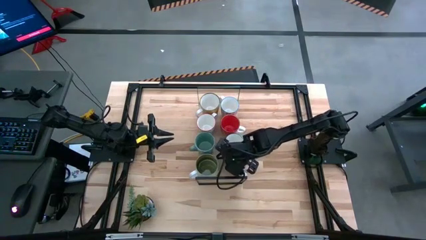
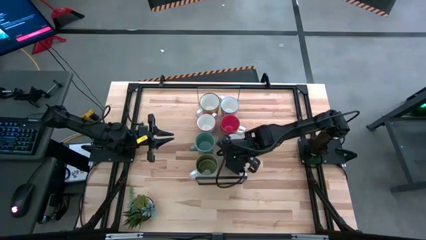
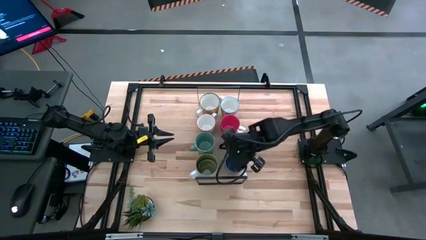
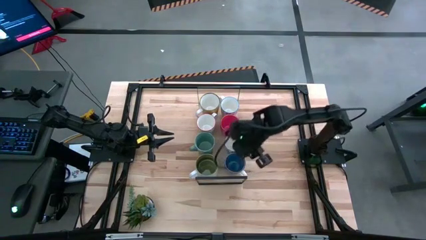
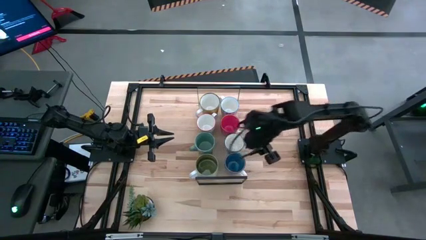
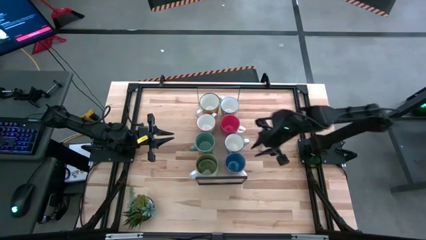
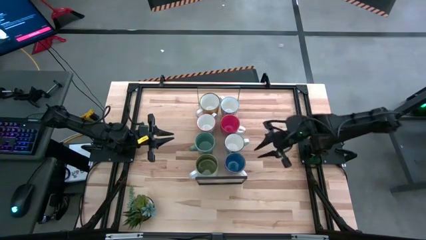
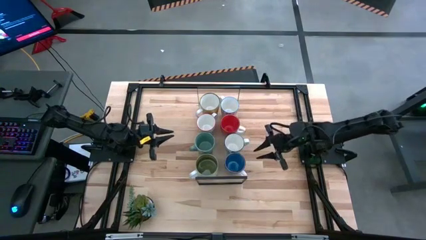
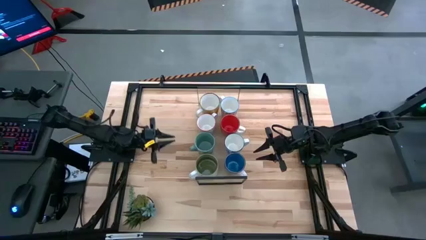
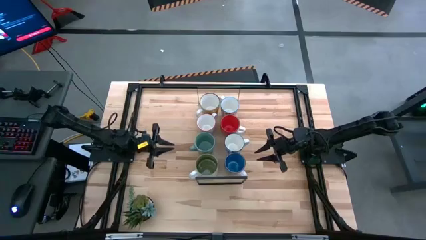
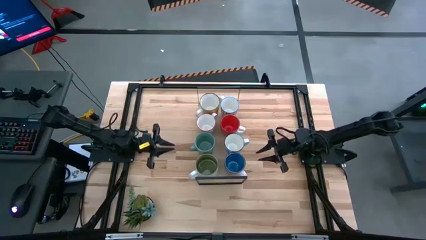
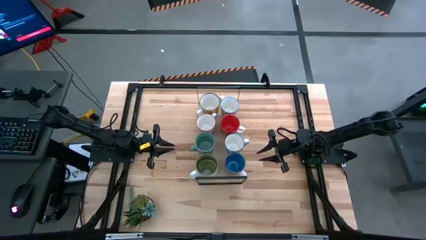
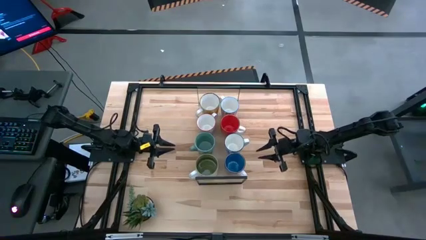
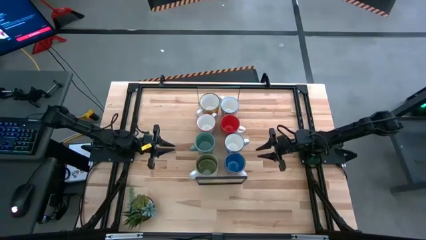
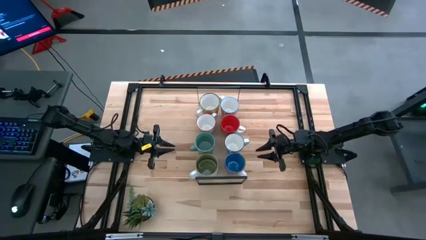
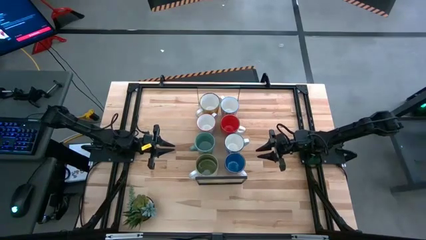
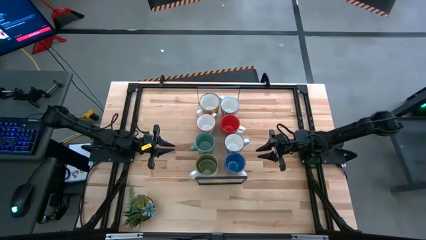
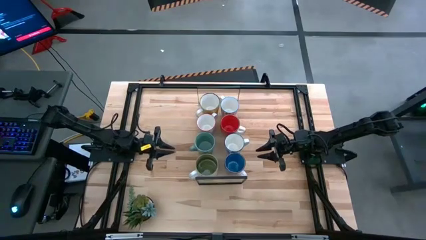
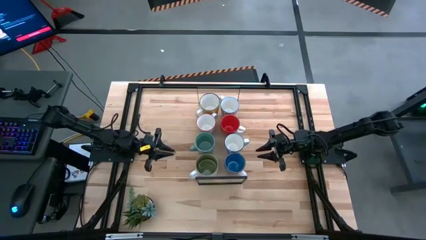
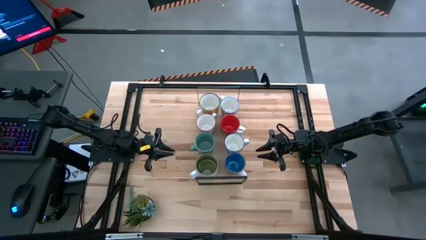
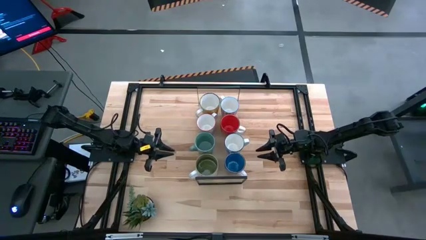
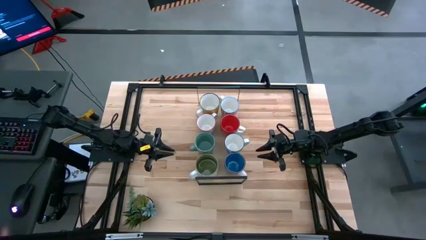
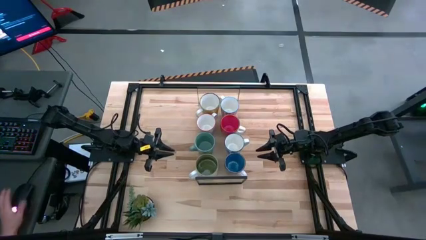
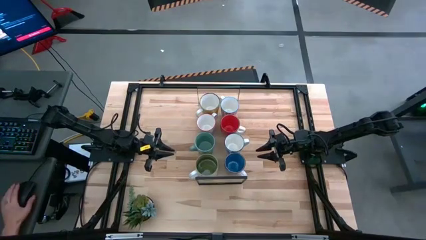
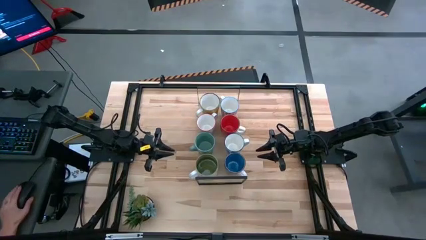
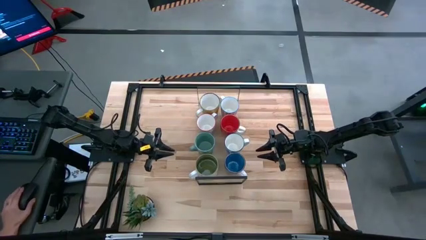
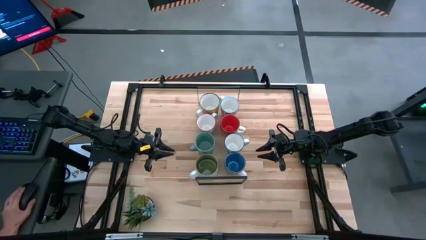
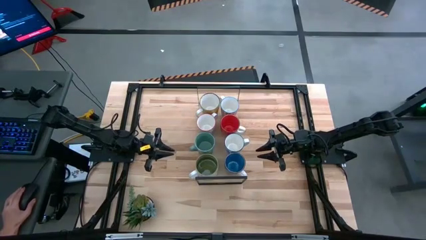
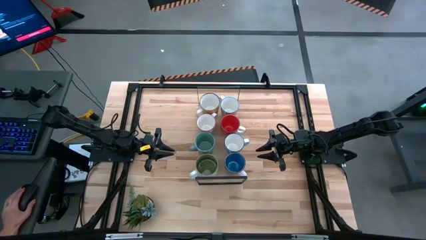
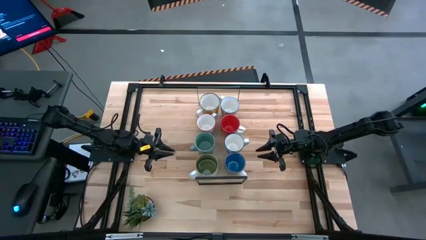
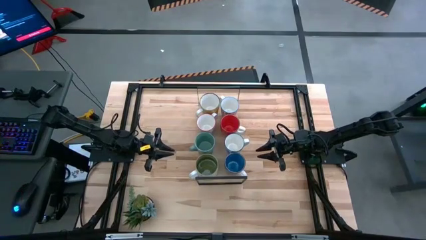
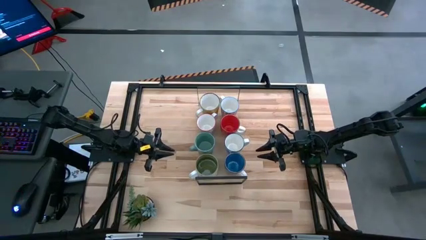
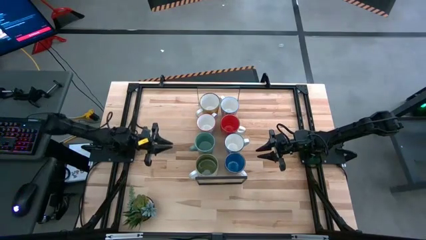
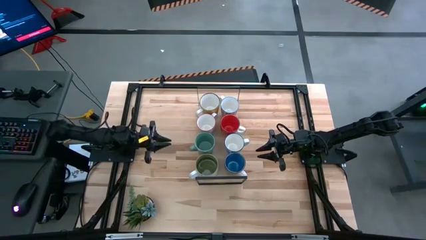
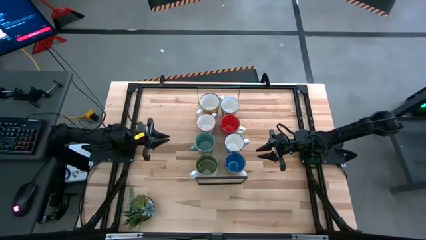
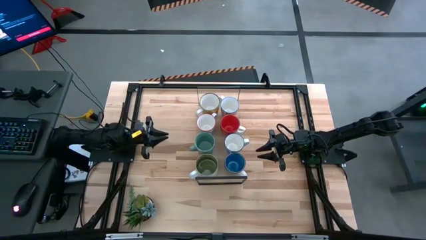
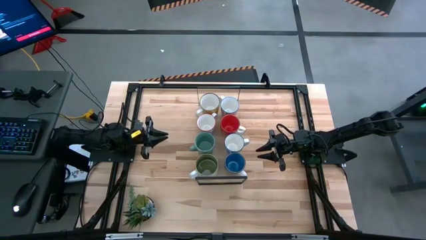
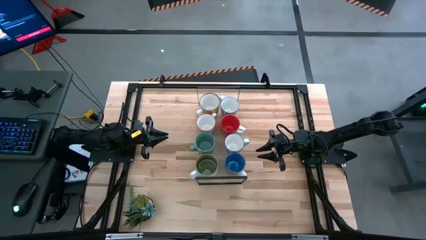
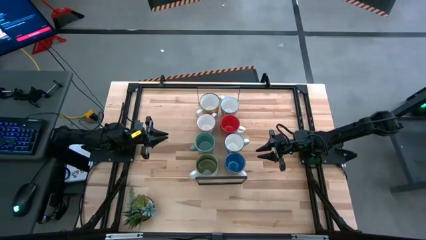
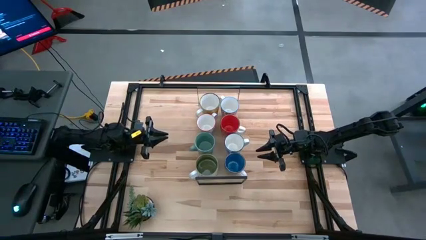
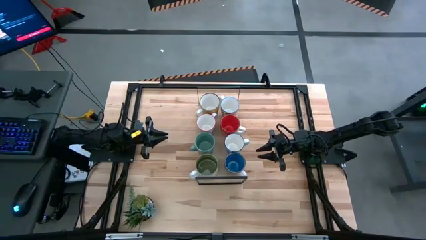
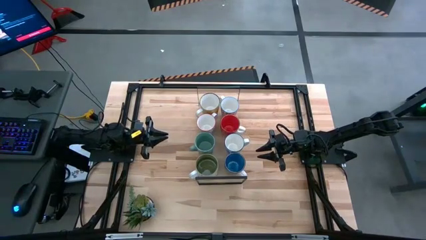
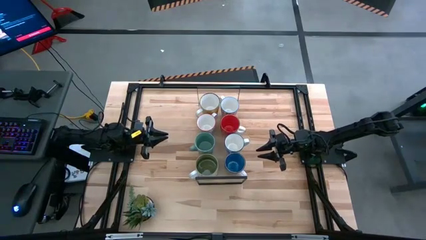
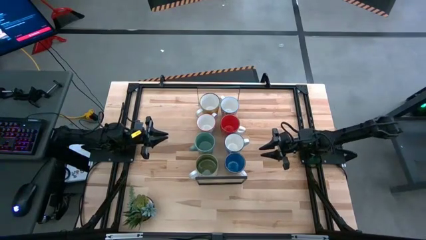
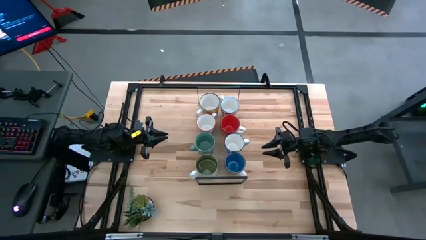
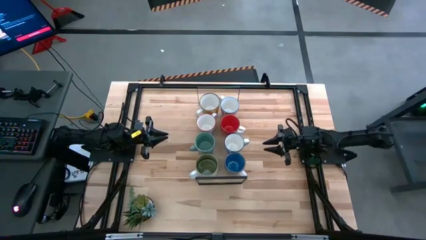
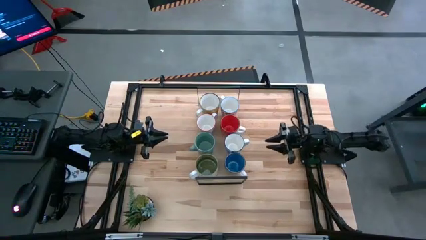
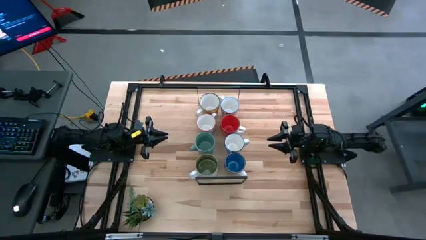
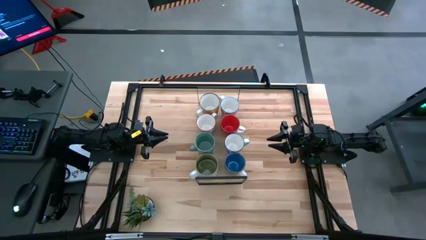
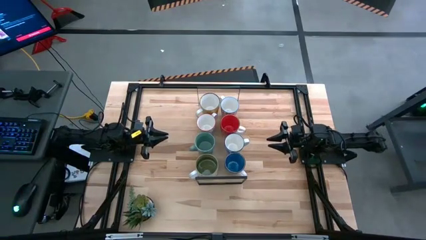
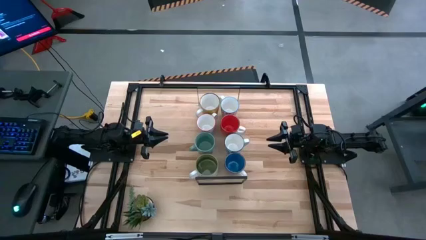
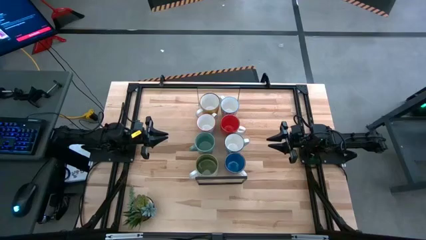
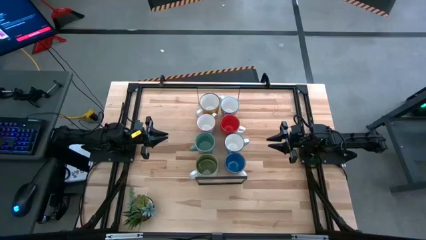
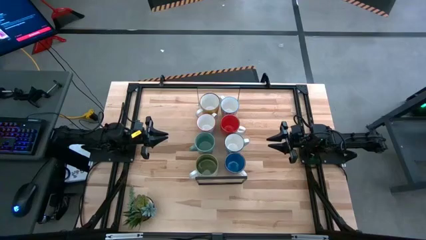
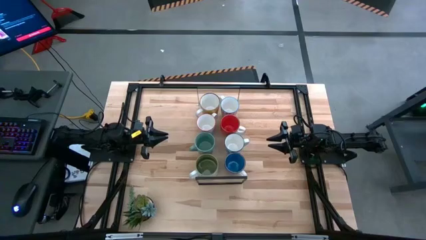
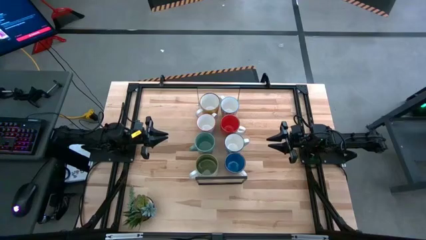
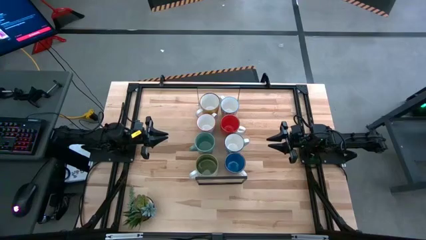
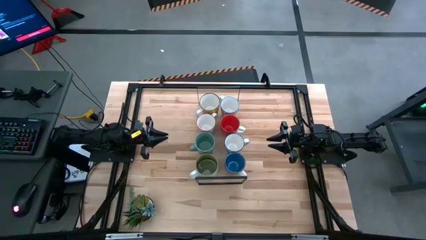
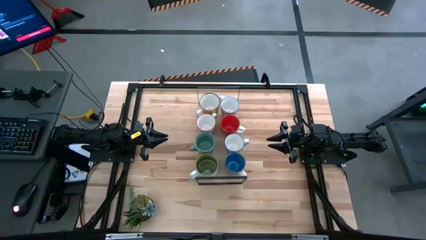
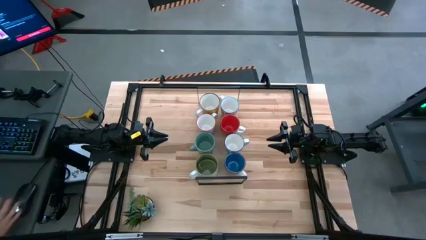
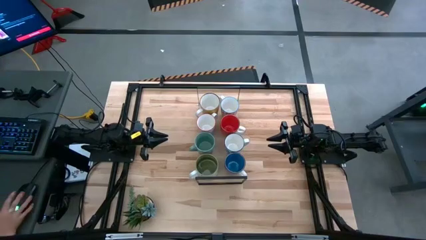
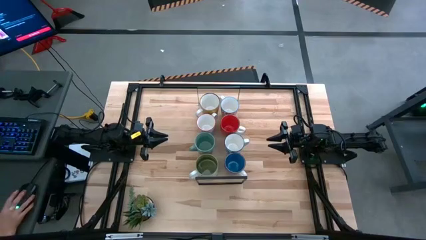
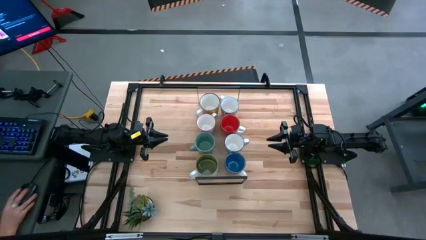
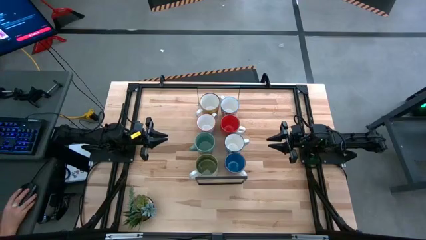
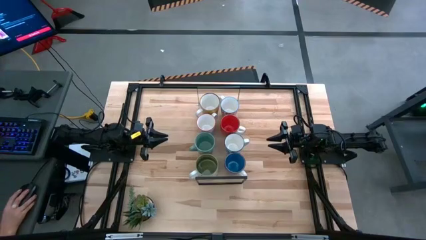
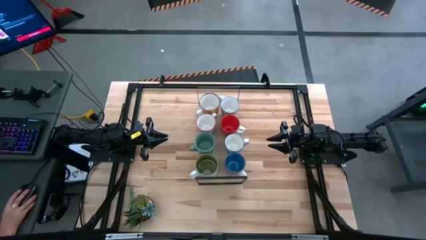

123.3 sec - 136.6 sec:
Task: Place coffee mugs
Return to Home Position

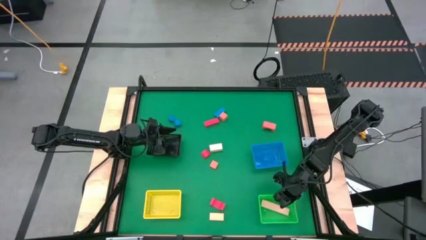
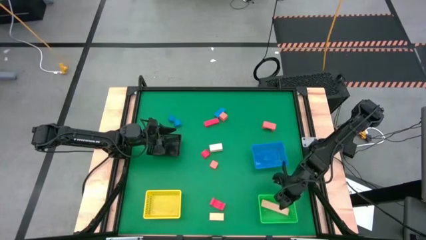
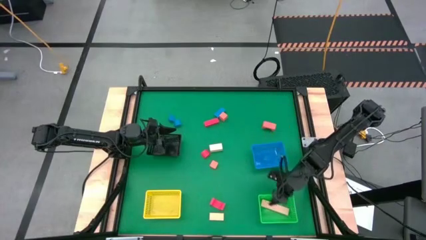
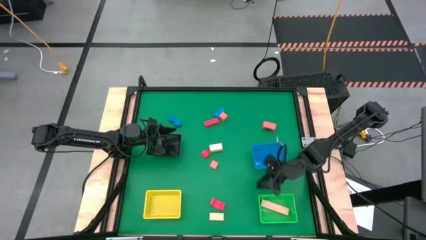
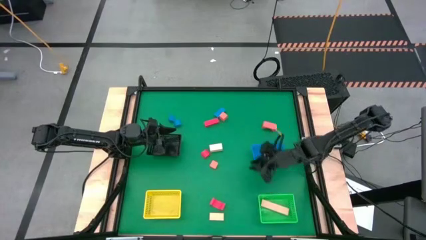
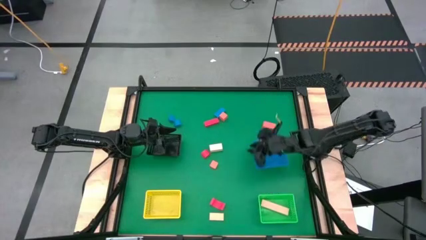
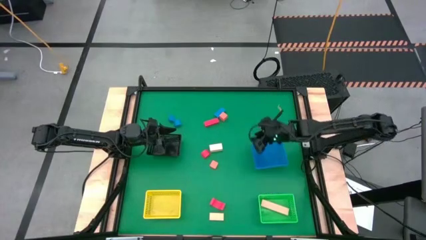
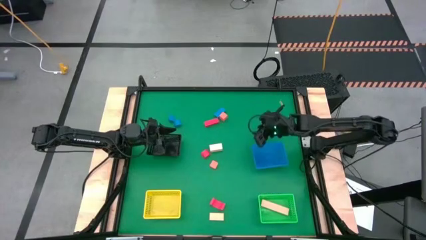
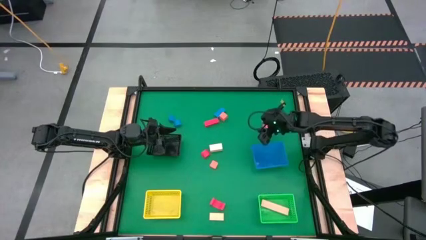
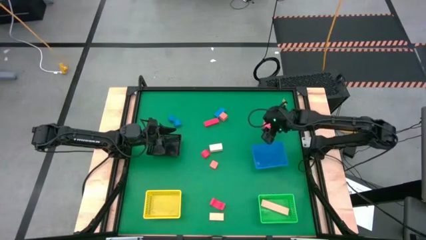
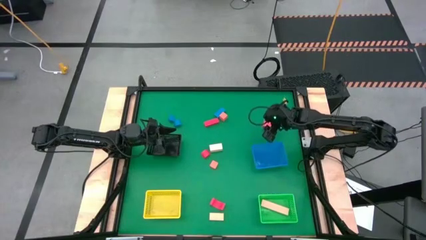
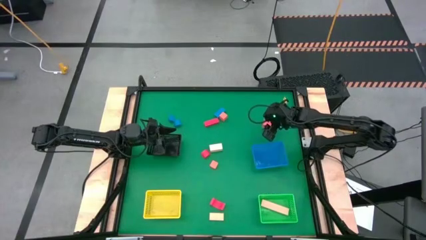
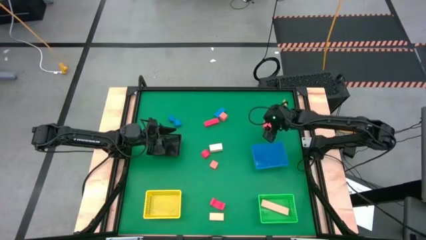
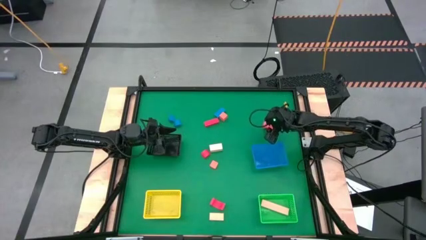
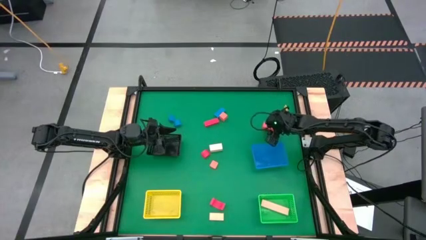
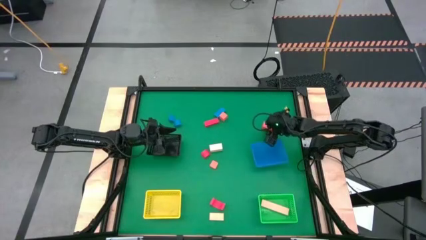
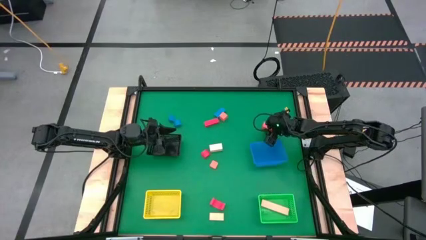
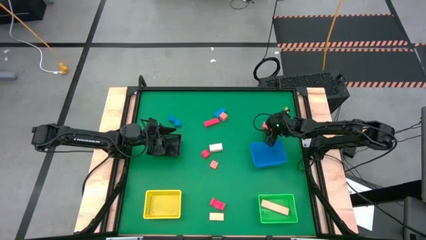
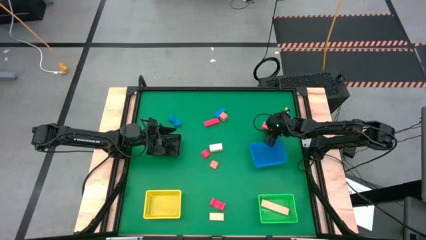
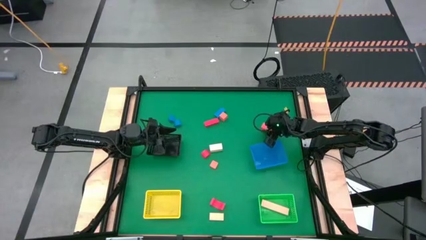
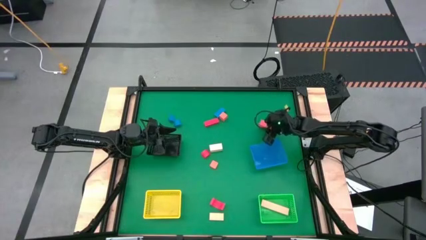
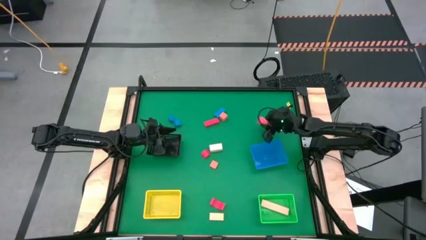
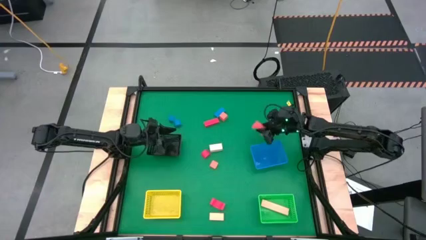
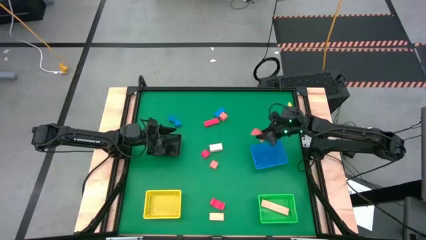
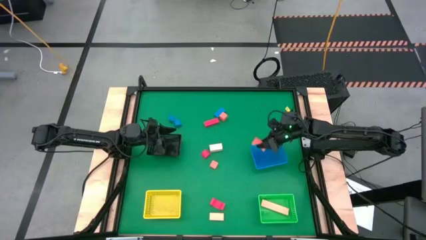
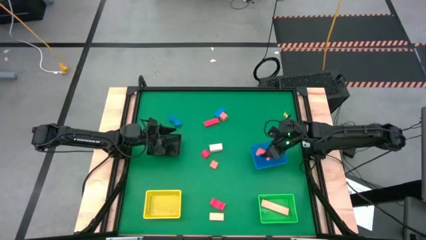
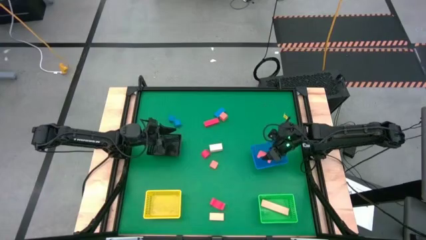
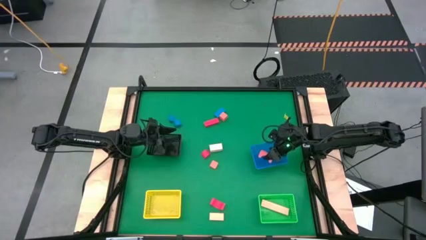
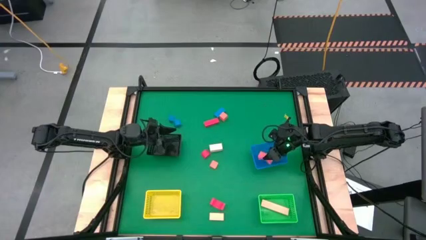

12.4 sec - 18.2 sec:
Task: Sort & place blocks by color
Put the top left orange block into the blue bin
